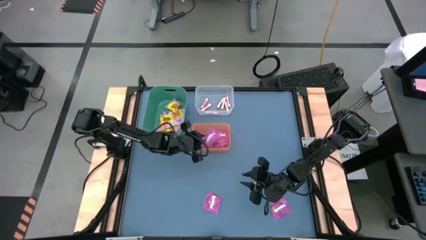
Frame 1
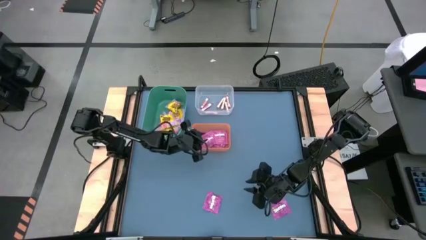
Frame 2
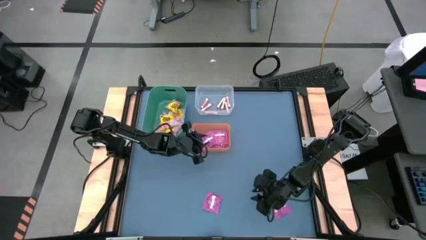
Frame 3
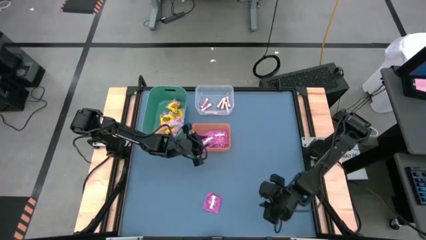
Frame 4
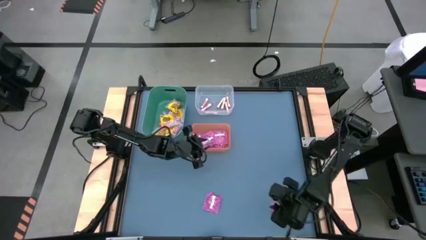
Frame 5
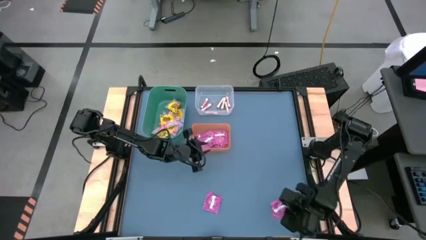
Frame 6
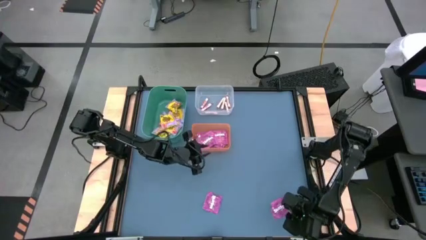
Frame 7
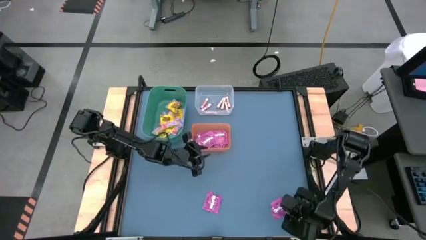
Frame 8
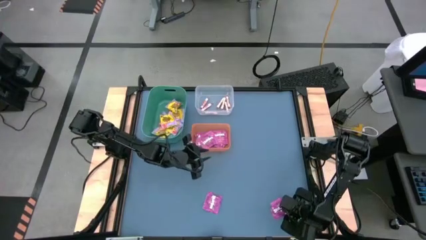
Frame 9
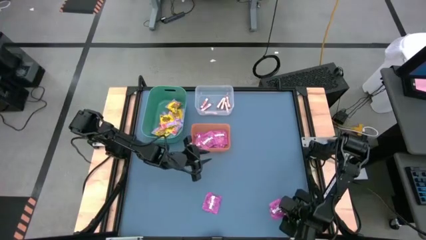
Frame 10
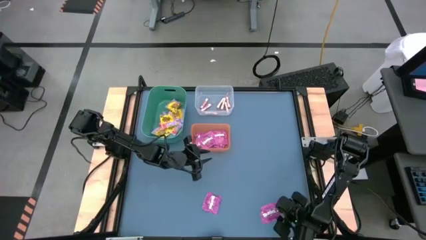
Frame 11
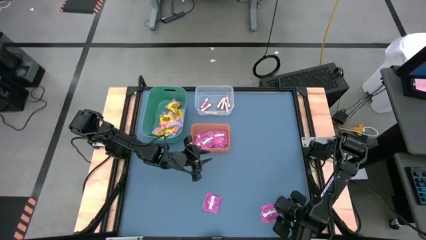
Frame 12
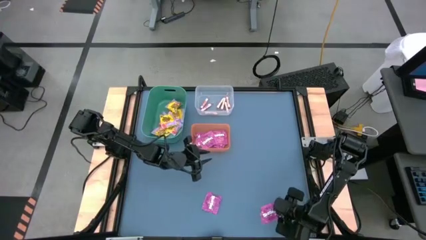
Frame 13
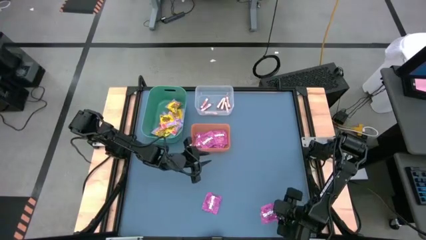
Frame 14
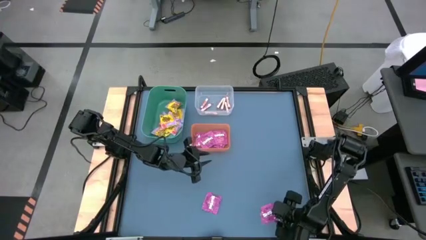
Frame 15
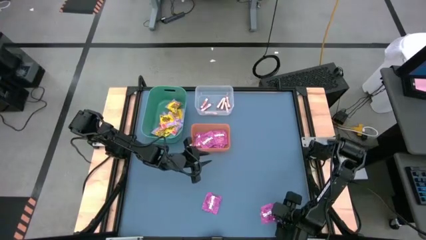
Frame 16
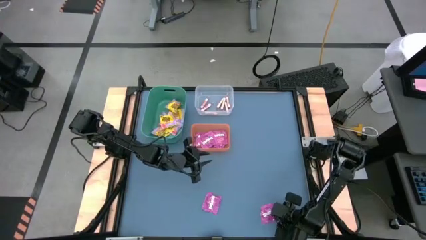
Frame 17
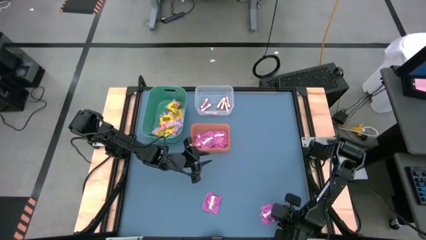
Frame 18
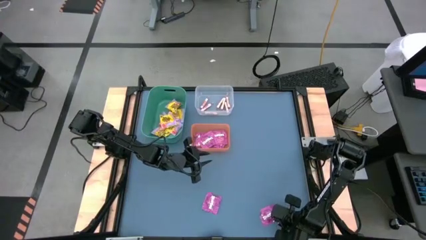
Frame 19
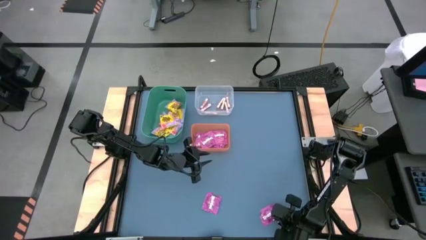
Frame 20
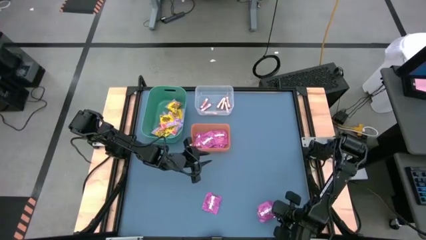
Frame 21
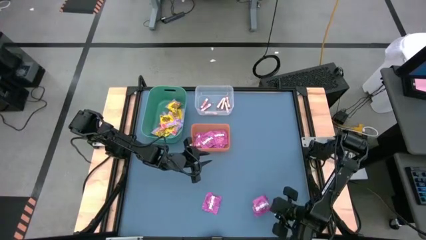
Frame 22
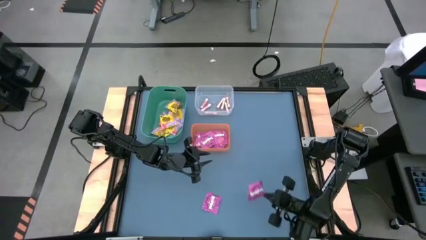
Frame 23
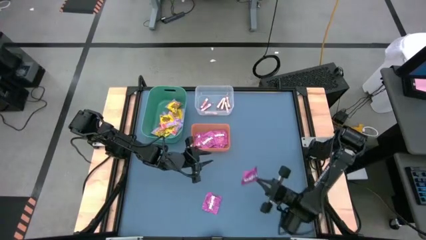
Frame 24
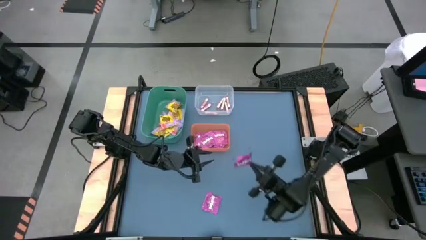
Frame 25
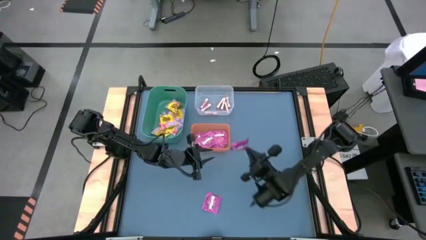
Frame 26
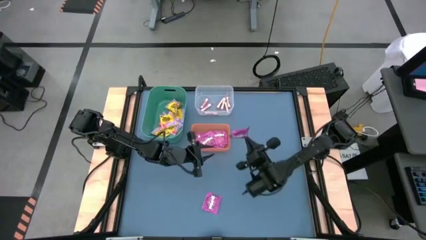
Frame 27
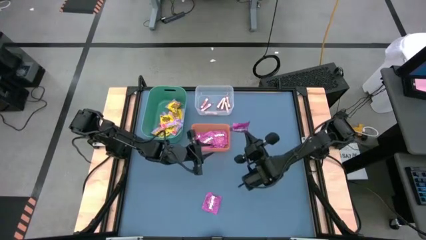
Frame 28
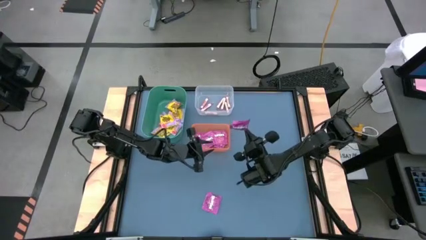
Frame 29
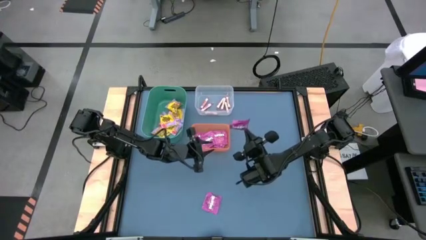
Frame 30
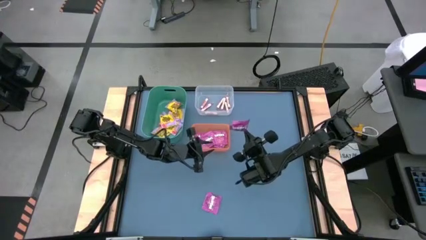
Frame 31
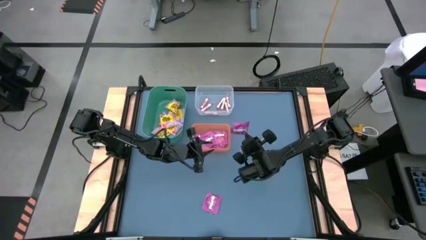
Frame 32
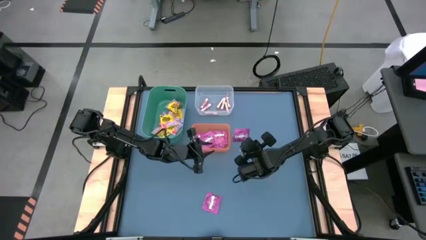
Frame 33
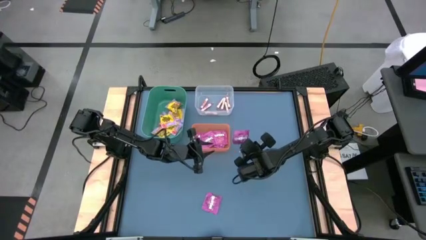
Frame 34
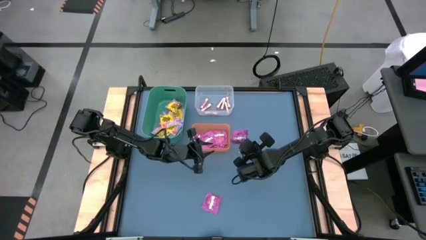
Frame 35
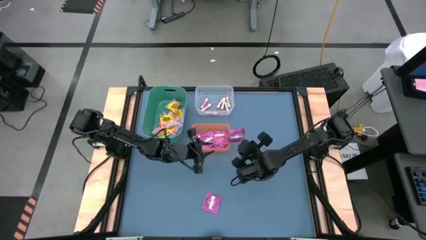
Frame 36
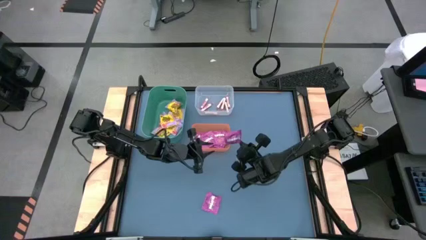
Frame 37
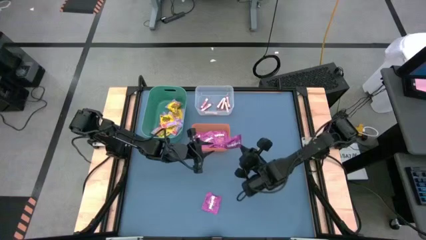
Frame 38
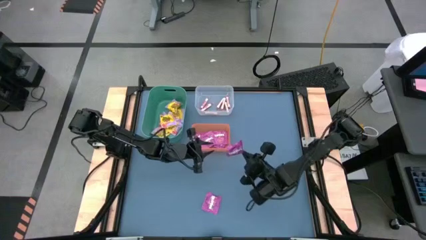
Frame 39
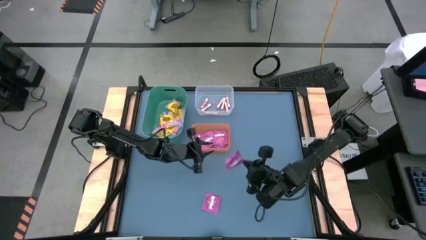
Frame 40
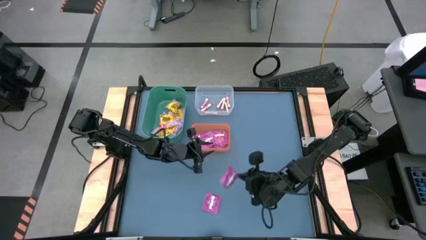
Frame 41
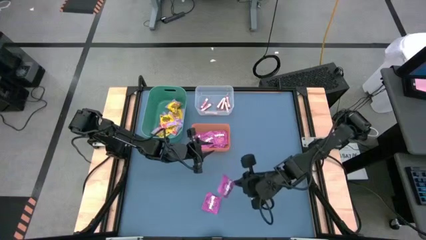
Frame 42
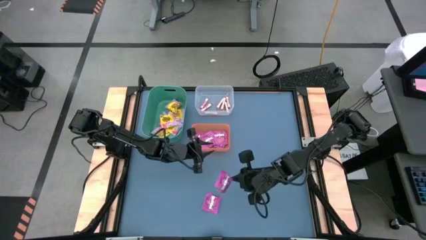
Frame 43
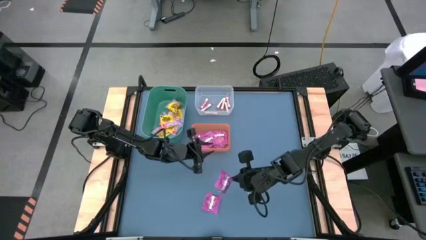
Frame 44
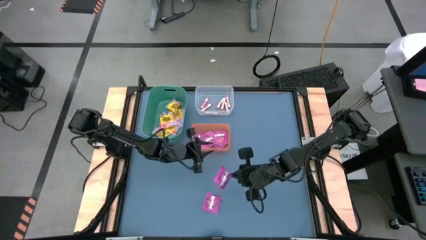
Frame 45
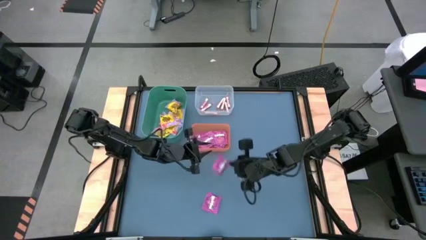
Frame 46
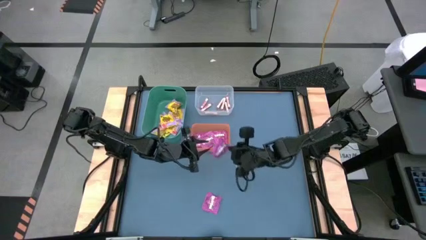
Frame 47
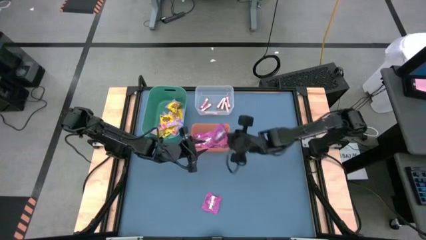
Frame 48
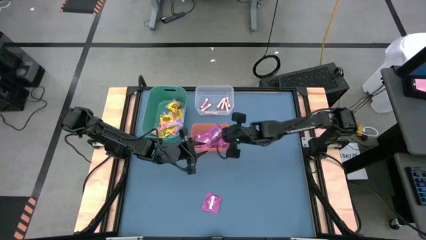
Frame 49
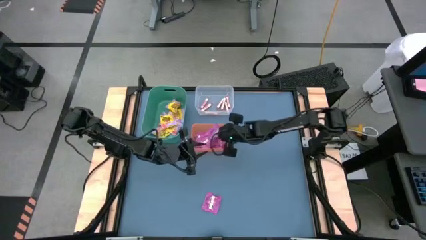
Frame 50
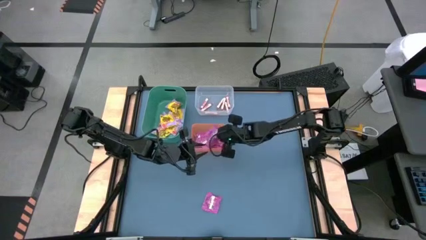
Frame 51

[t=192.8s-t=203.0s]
Task: Sort candy
Put the violet candy into the orange bin

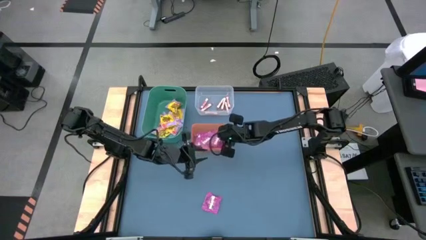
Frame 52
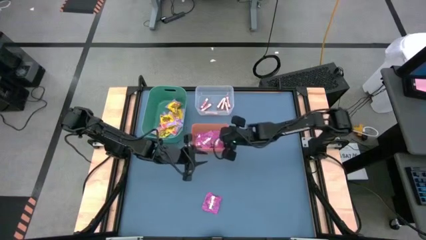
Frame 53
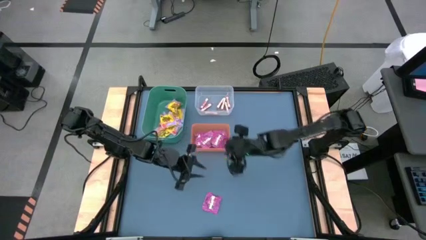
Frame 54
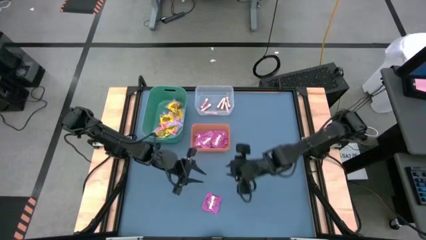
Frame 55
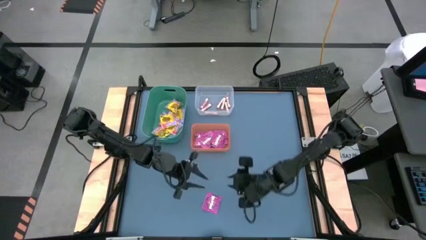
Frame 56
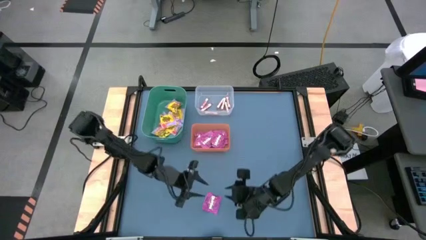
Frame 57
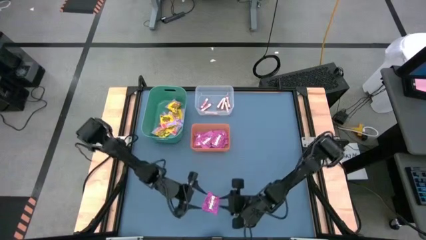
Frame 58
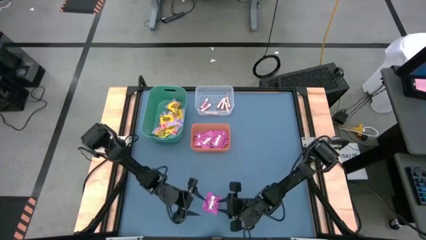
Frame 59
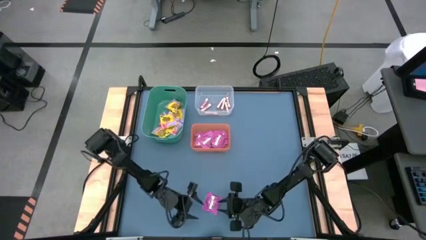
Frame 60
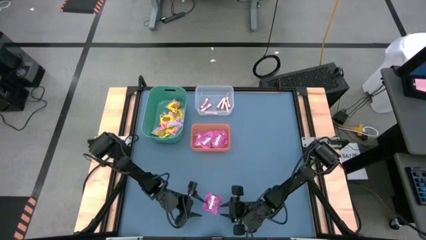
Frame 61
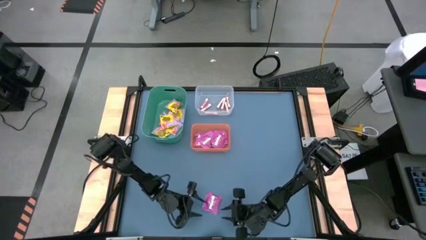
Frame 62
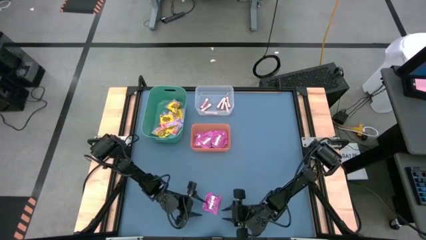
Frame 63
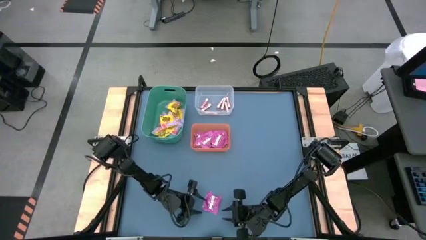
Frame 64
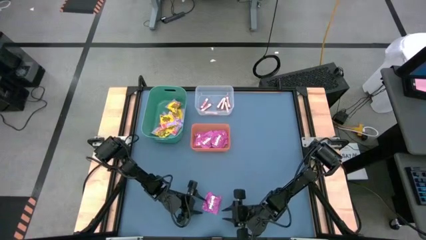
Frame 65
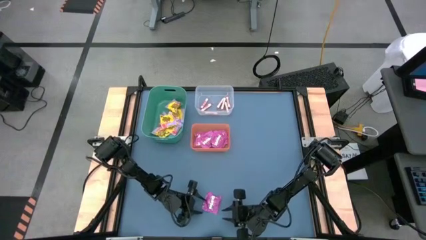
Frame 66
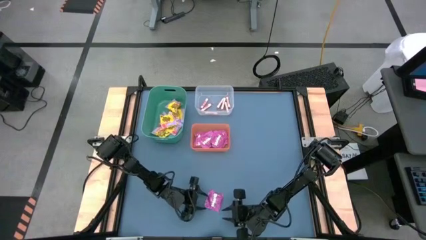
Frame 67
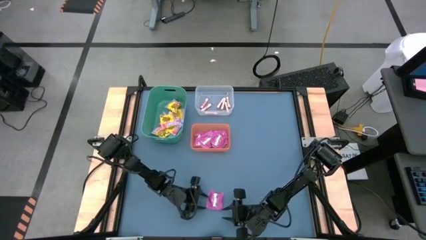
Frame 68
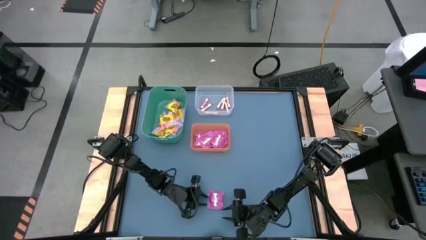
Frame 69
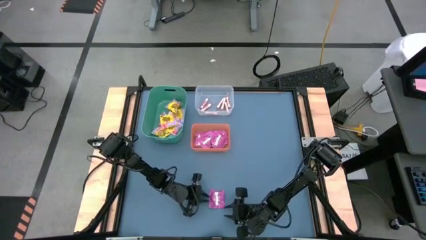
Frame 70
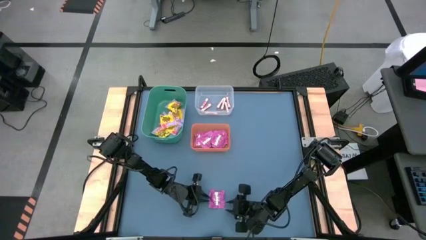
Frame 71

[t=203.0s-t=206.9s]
Put the violet candy into the orange bin

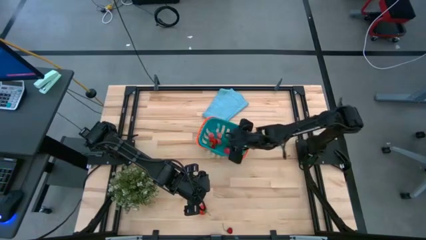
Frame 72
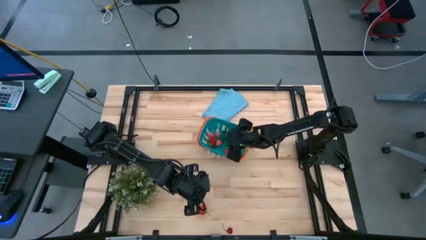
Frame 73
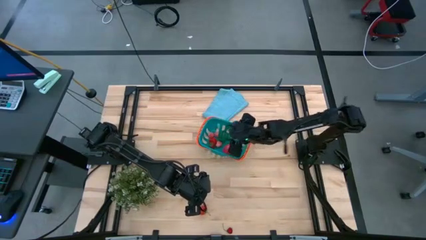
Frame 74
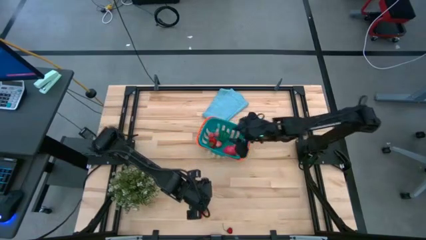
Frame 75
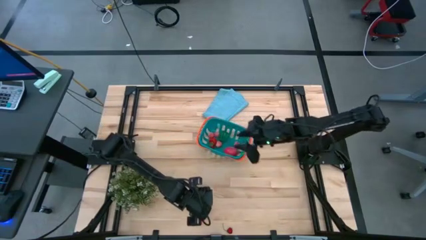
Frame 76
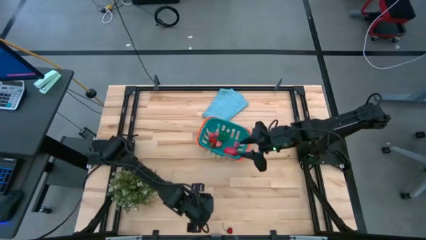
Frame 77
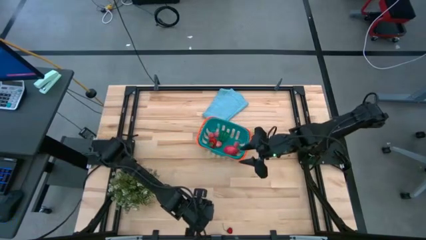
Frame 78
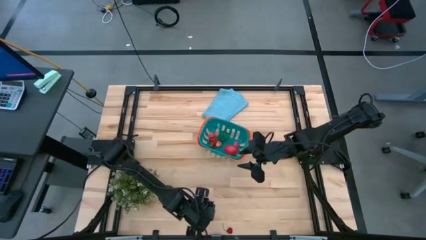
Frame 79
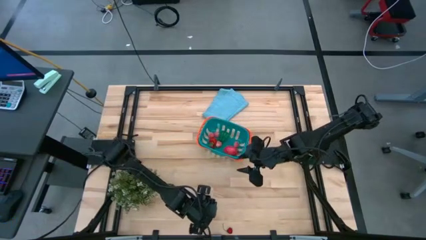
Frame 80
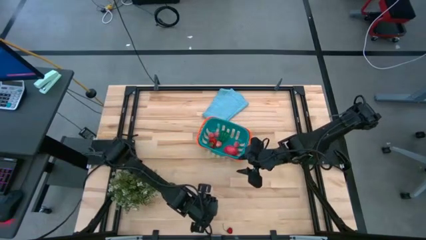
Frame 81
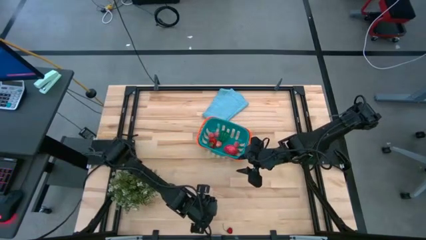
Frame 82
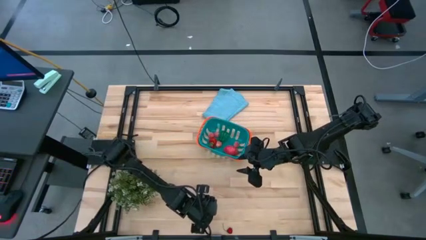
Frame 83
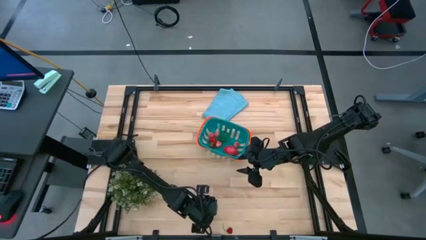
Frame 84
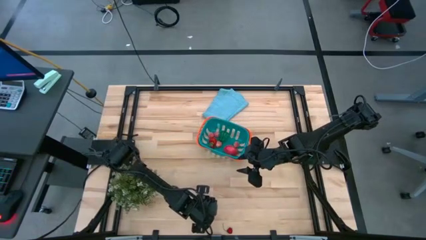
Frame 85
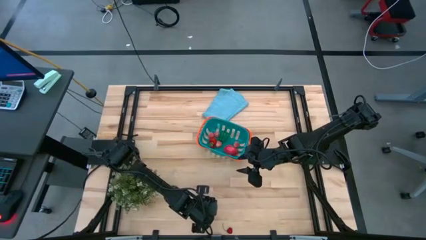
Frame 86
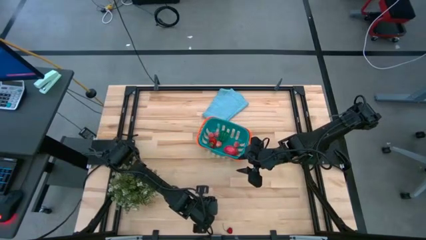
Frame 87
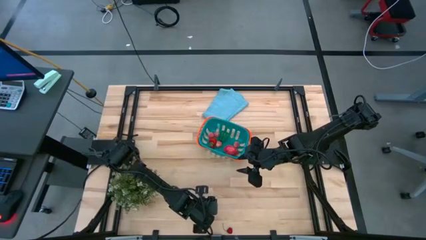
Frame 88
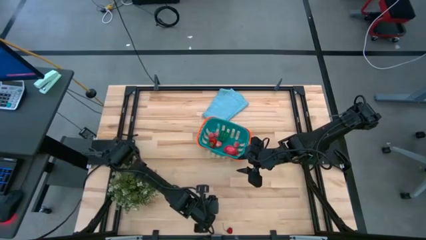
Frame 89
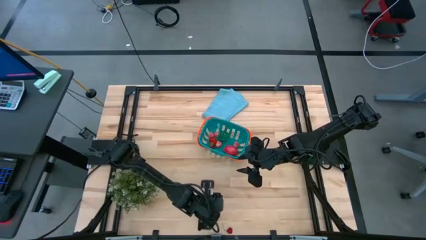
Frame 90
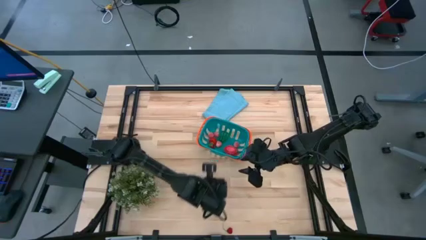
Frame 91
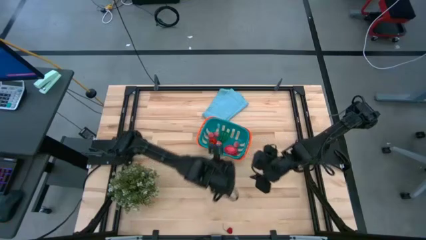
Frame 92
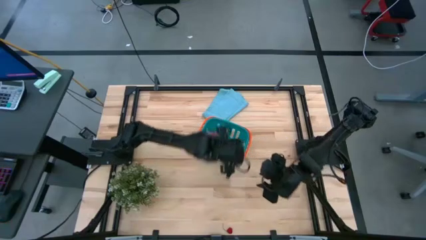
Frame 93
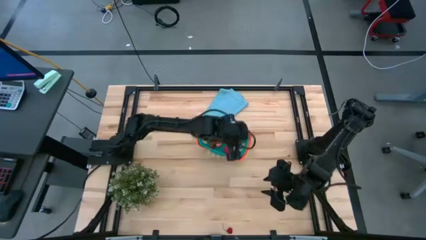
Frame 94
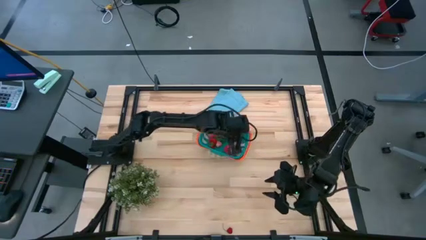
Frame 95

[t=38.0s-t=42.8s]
Task: Pick and placing Produce into tupperware
Put the red strawberry into the bin
